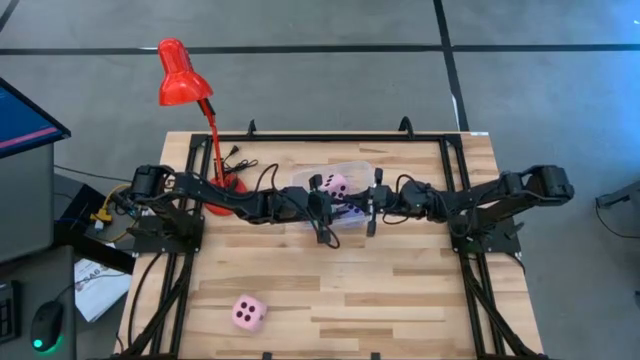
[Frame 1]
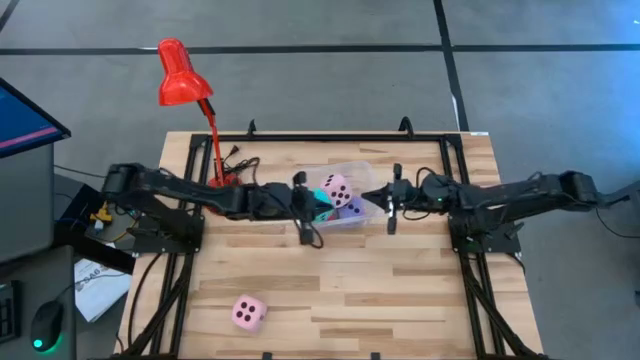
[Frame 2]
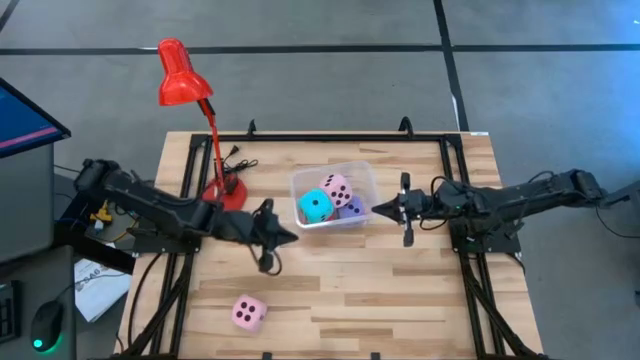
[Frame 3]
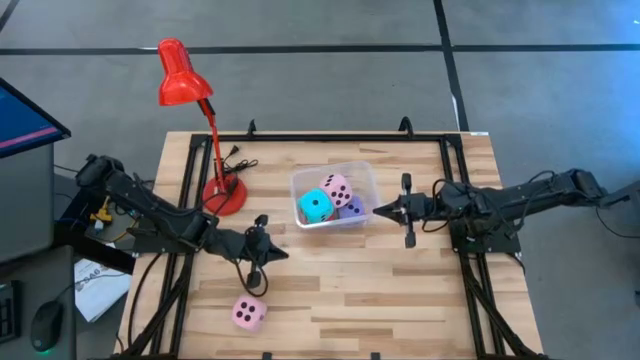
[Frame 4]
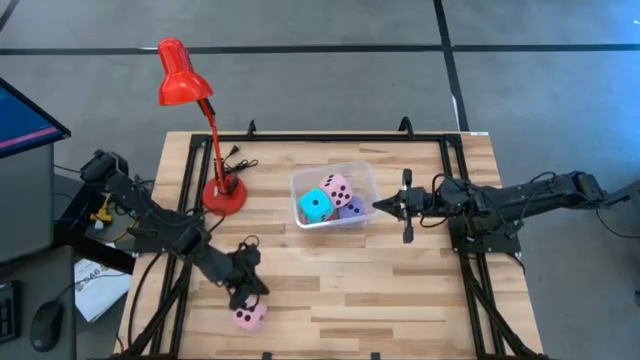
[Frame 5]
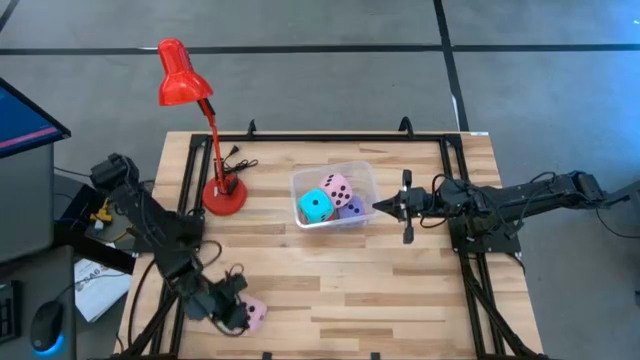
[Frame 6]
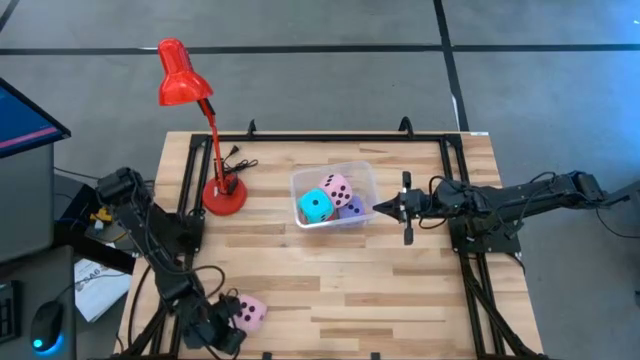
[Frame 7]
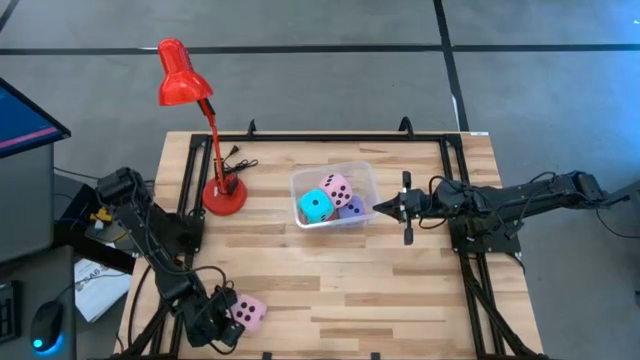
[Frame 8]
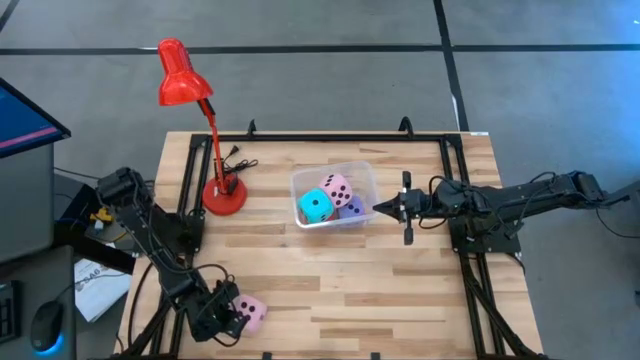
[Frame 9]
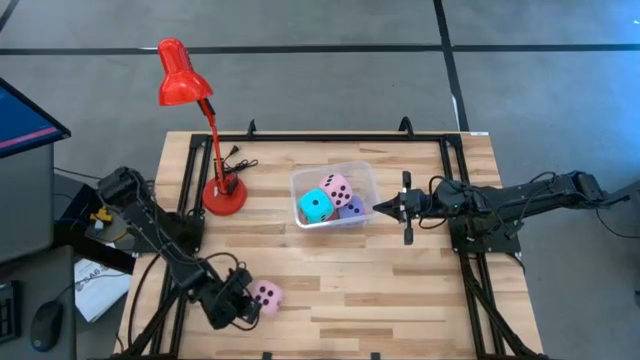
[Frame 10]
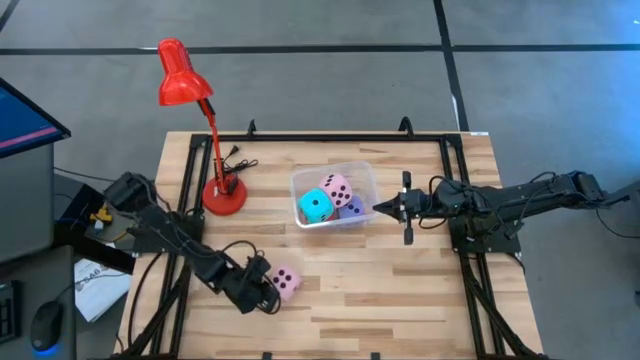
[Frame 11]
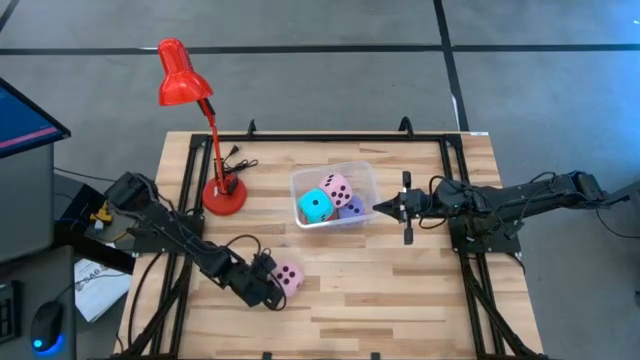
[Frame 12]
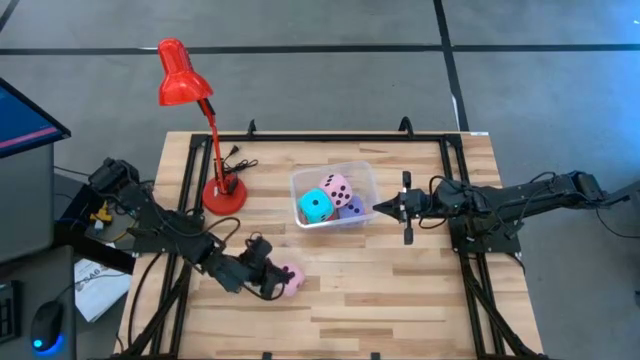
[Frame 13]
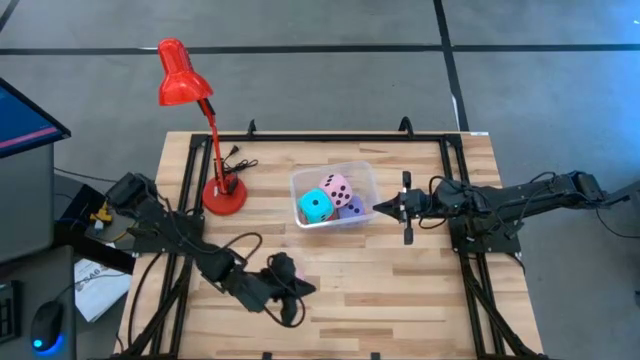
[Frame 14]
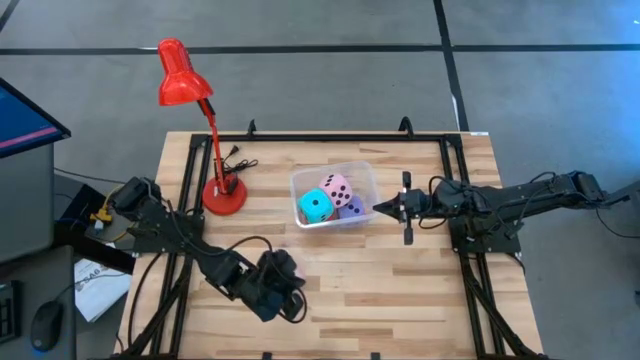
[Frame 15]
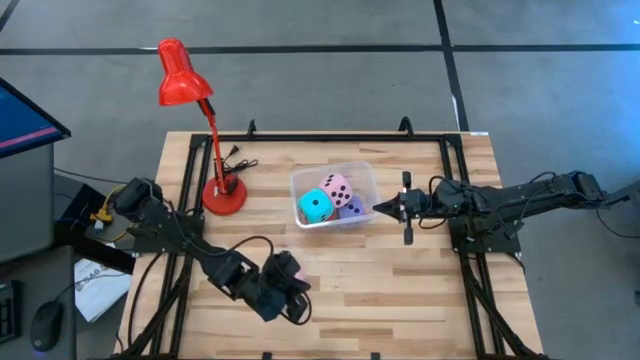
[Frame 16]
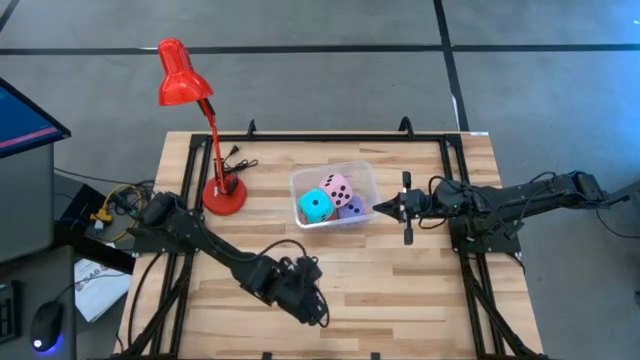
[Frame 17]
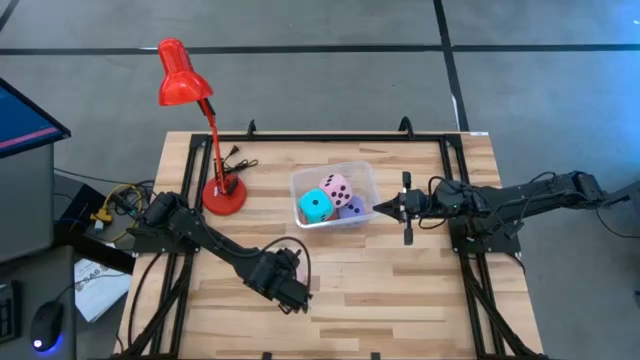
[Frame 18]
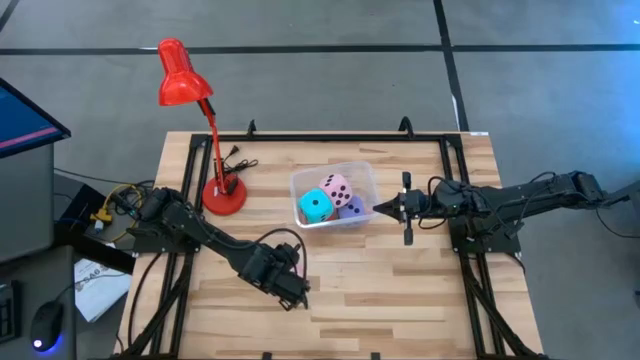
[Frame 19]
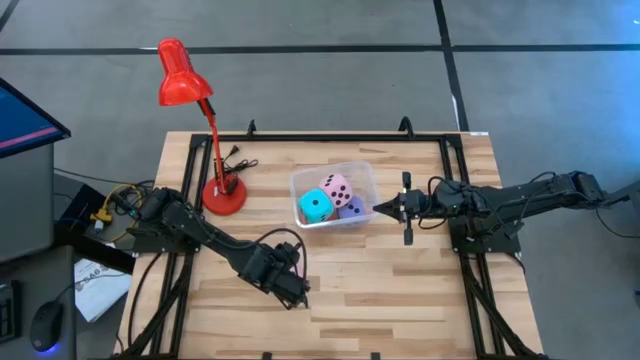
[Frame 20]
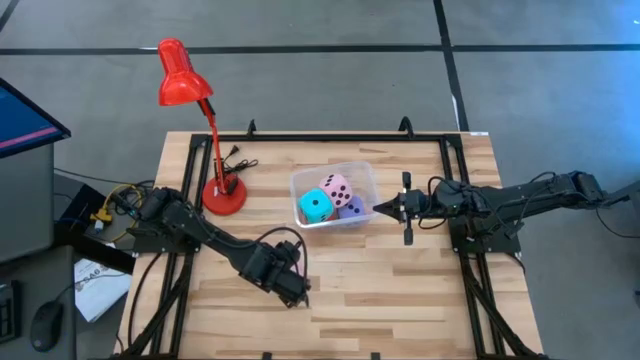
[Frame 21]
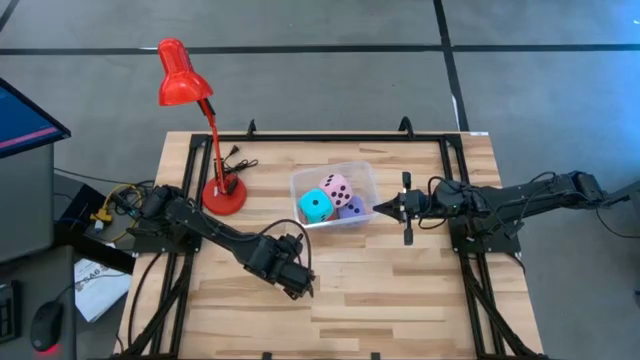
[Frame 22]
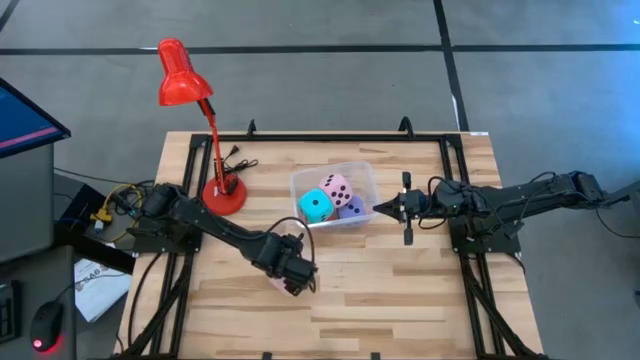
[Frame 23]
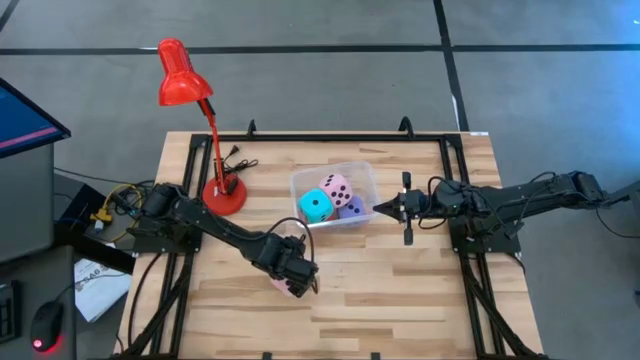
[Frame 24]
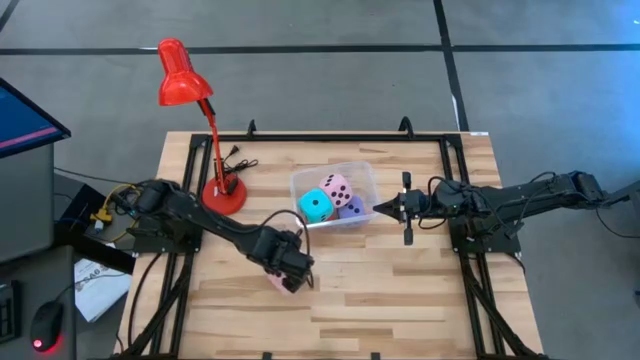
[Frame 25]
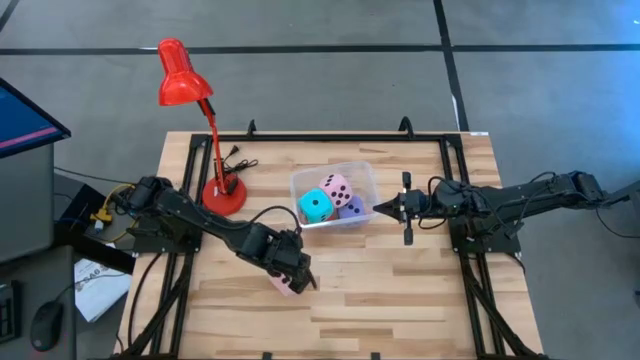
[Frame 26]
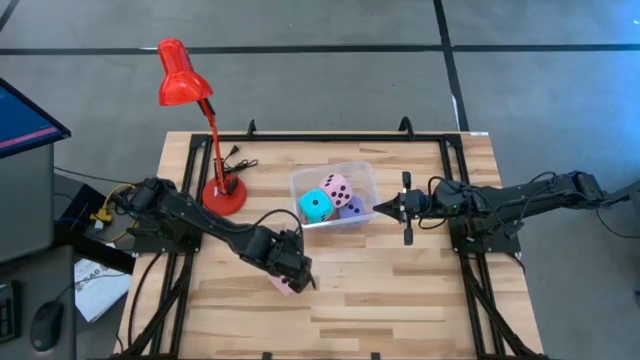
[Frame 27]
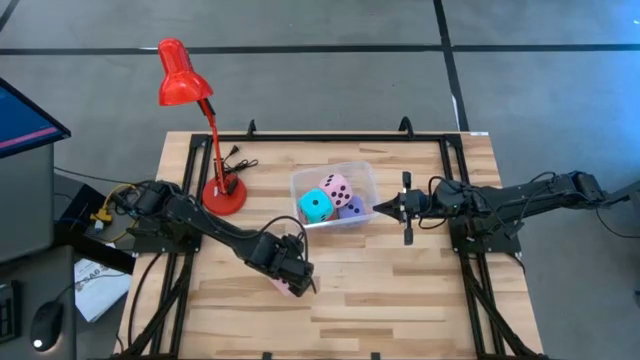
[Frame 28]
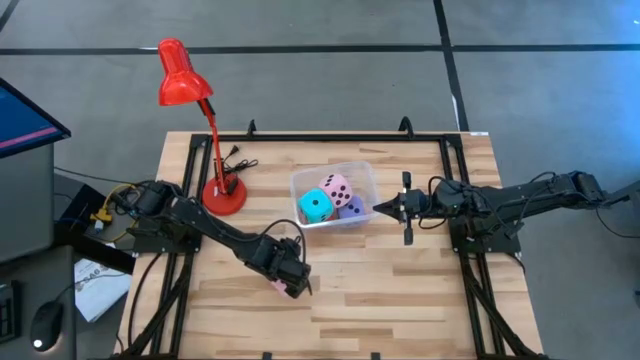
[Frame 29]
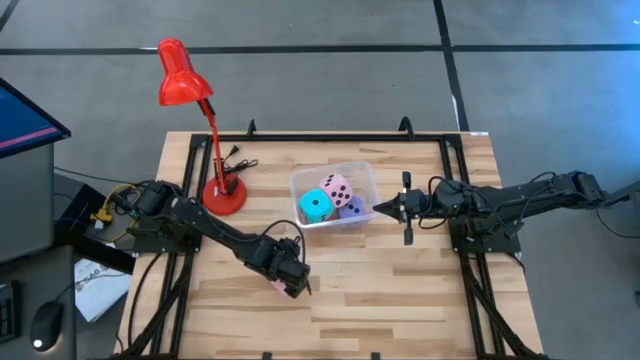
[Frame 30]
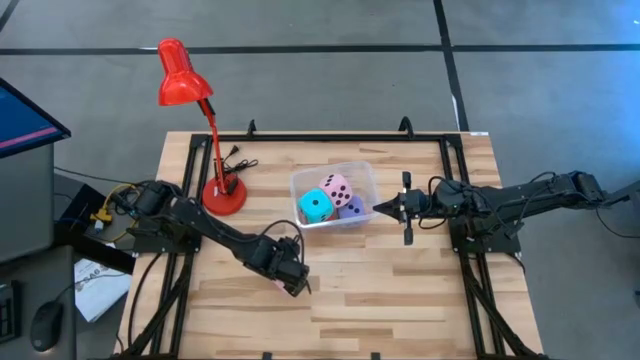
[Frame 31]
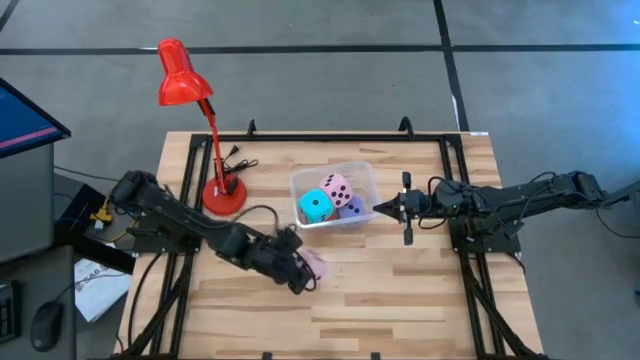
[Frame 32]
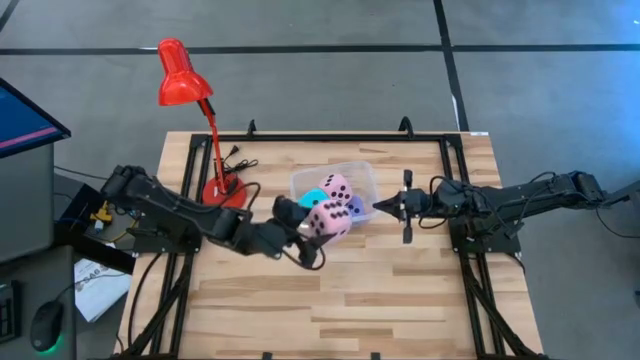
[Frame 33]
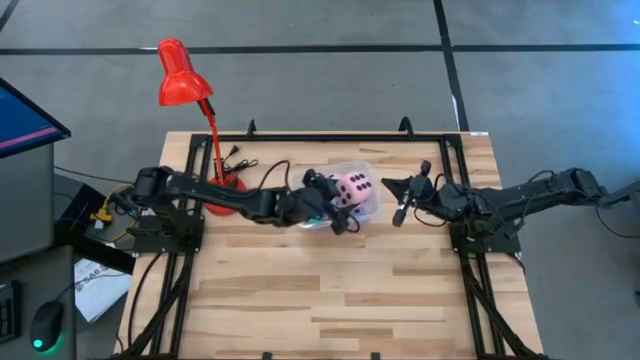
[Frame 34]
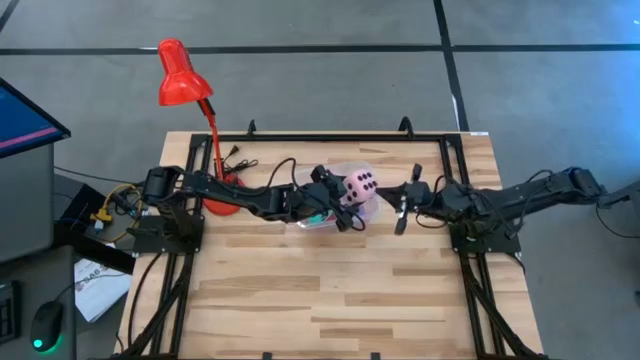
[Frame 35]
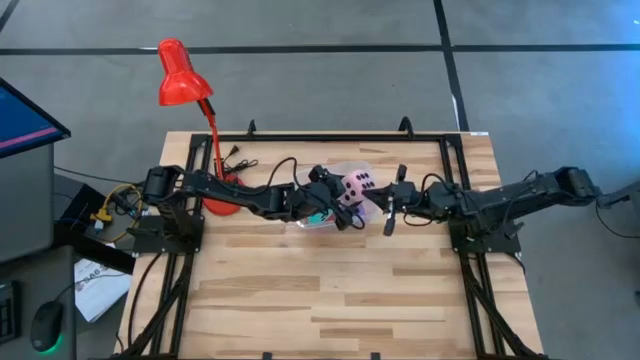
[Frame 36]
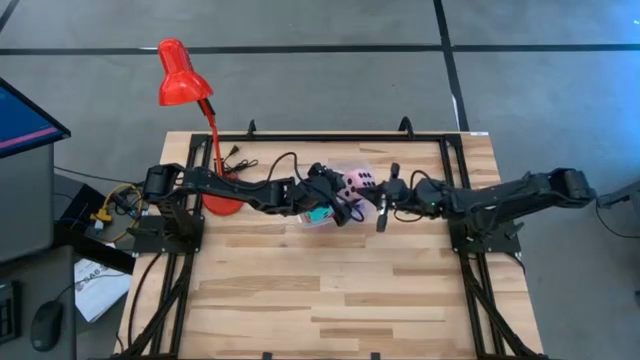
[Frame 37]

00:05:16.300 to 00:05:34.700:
Task: Pick & Place Dice
Put the large pink die into the transparent bin

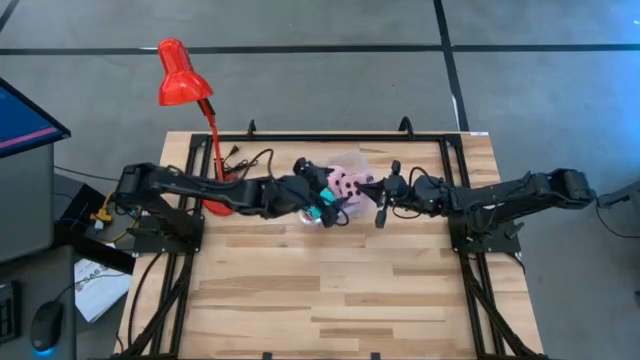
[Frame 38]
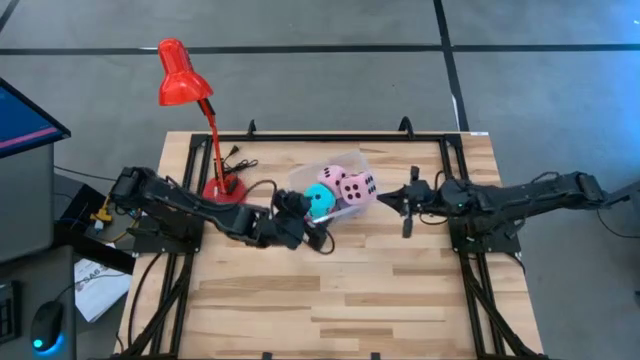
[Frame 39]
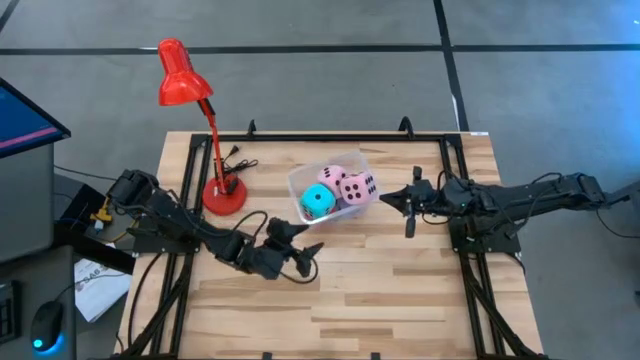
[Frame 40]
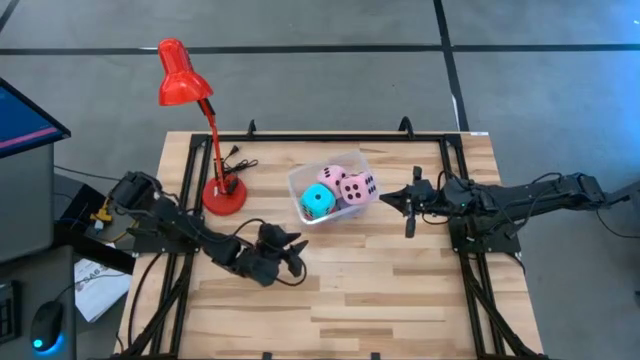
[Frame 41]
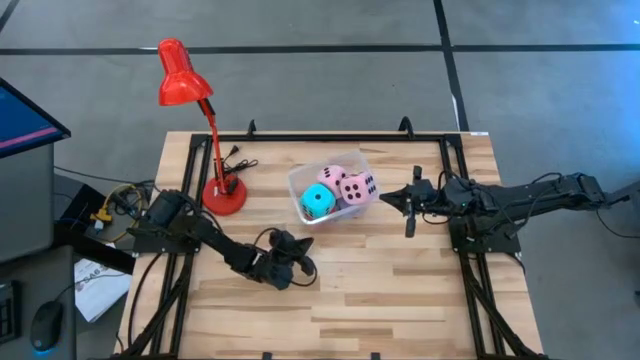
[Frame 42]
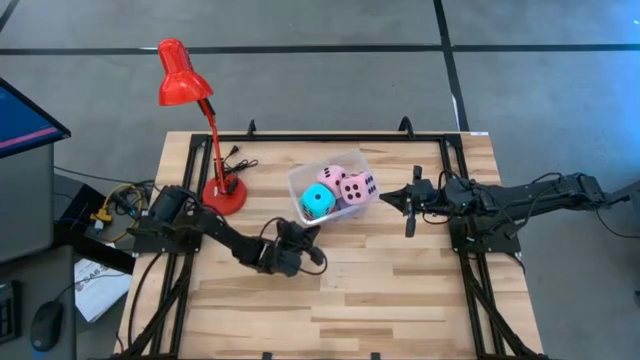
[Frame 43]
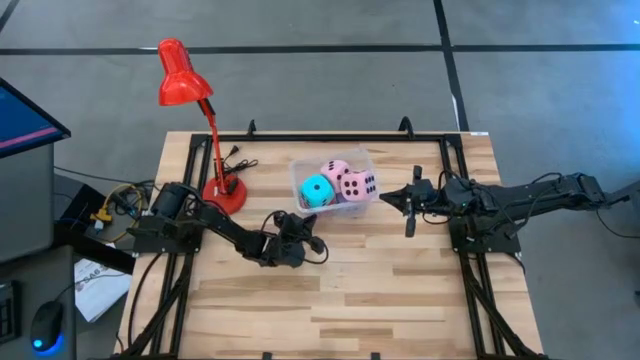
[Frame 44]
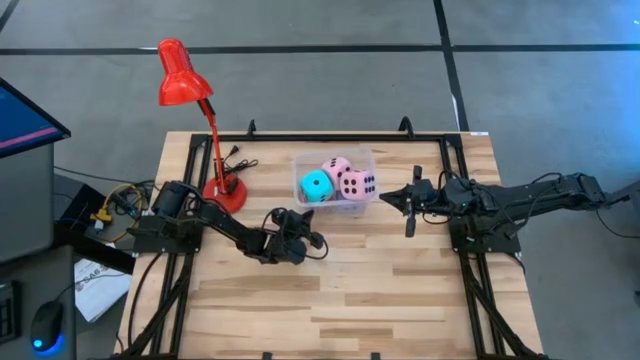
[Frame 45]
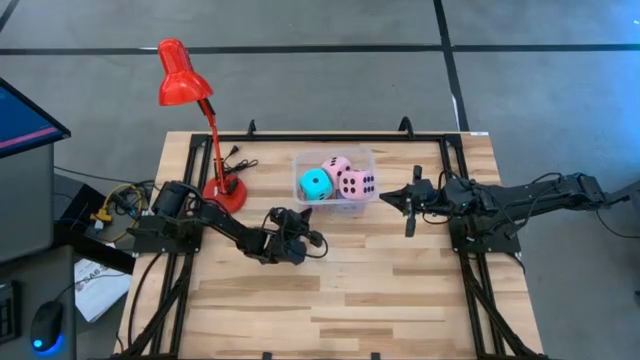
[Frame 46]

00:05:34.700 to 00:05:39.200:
Adjust the transparent bin
